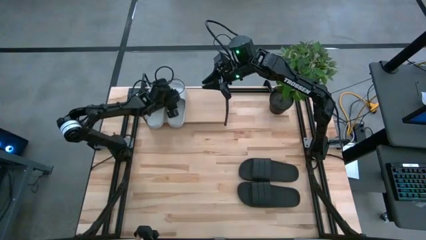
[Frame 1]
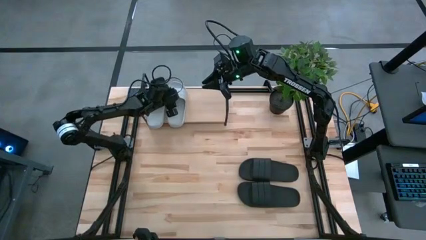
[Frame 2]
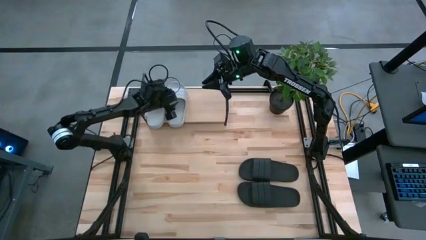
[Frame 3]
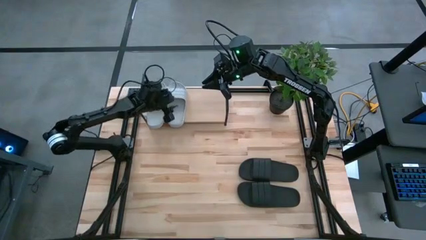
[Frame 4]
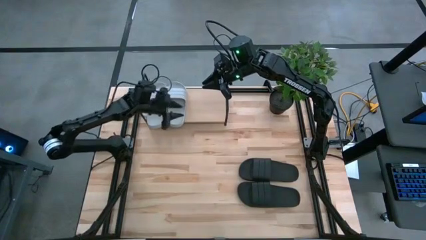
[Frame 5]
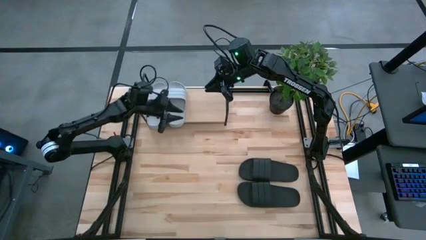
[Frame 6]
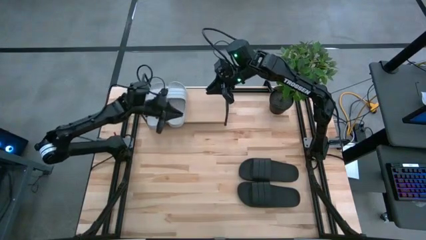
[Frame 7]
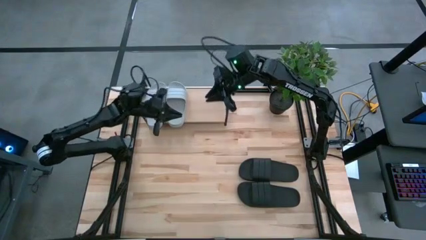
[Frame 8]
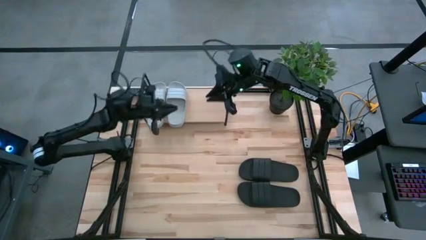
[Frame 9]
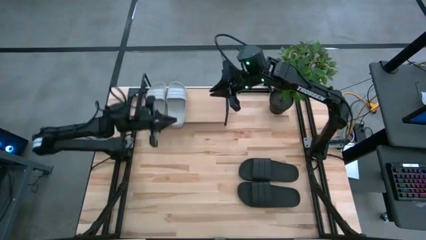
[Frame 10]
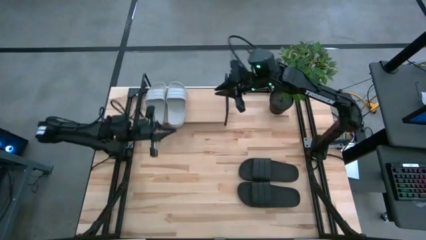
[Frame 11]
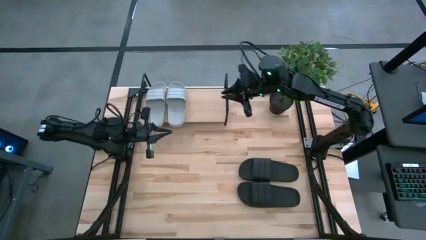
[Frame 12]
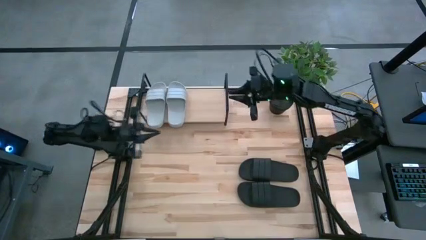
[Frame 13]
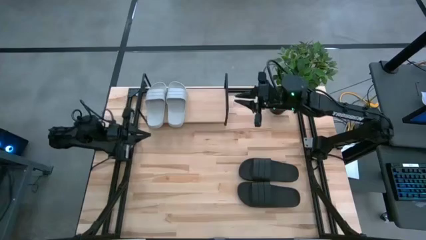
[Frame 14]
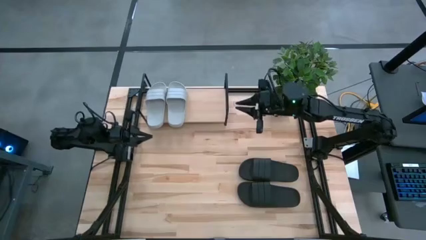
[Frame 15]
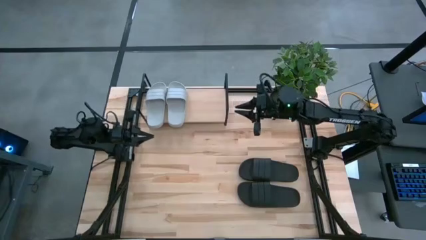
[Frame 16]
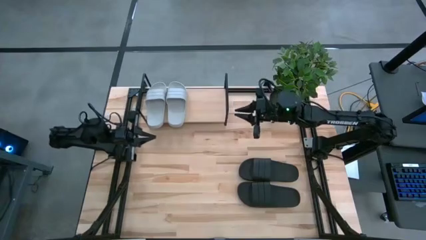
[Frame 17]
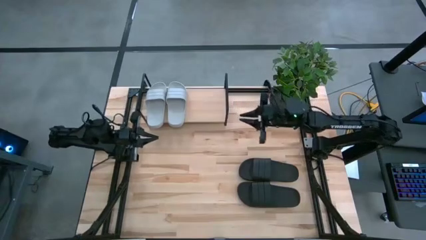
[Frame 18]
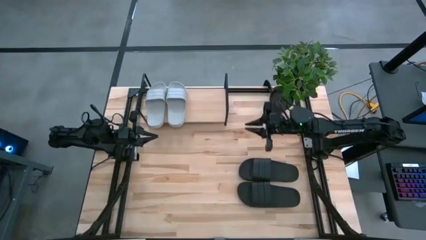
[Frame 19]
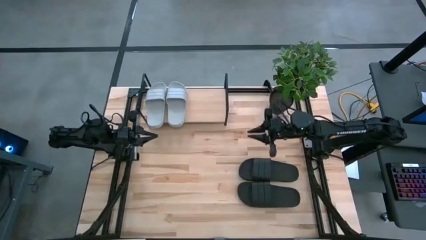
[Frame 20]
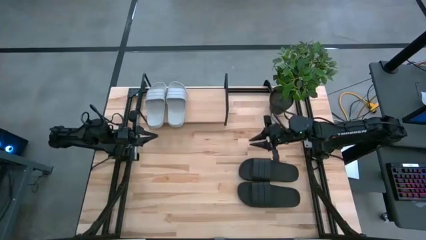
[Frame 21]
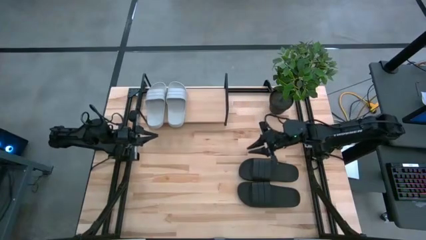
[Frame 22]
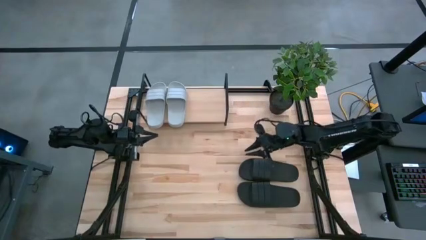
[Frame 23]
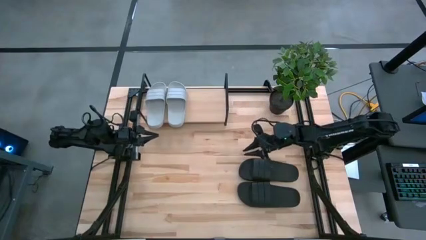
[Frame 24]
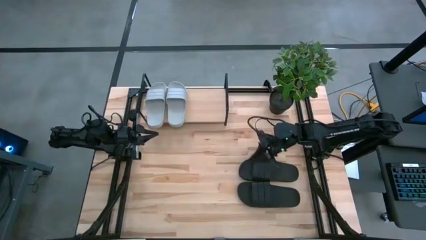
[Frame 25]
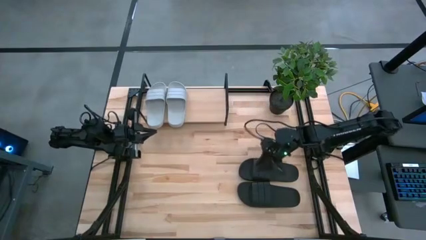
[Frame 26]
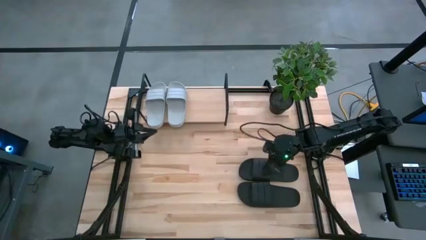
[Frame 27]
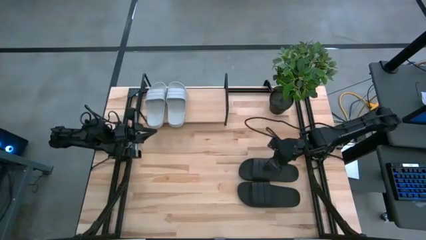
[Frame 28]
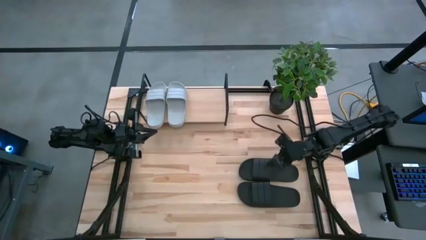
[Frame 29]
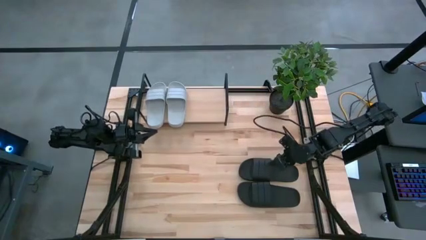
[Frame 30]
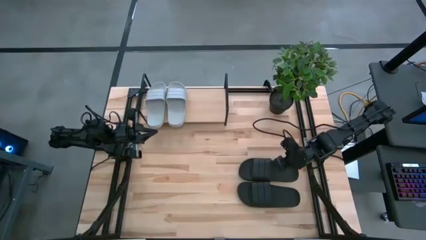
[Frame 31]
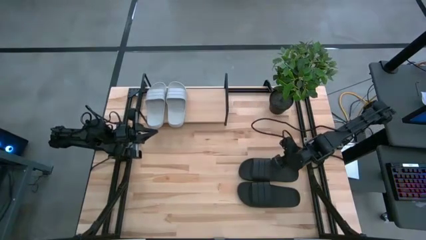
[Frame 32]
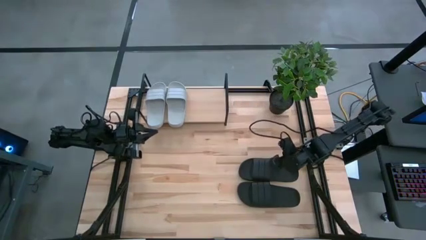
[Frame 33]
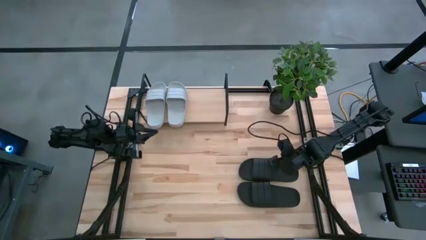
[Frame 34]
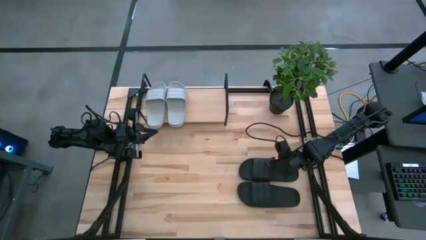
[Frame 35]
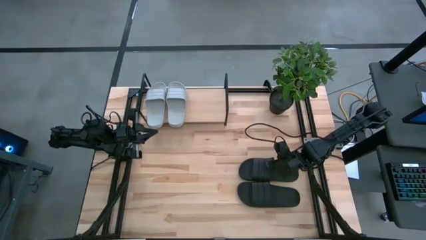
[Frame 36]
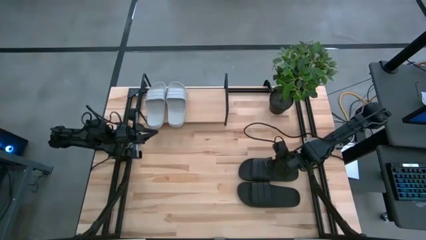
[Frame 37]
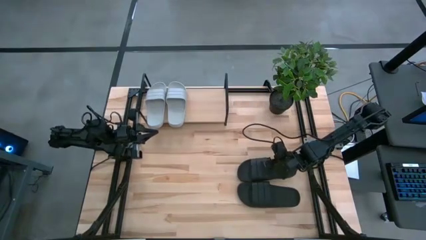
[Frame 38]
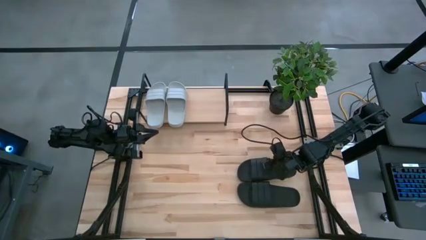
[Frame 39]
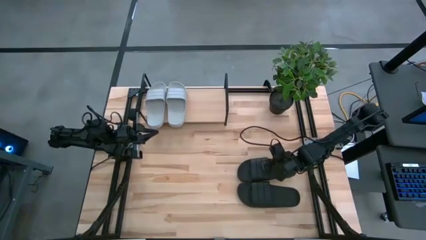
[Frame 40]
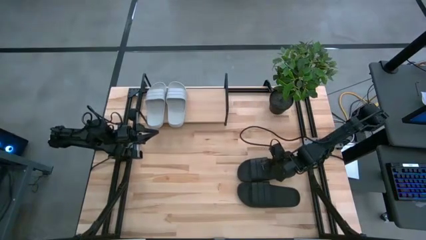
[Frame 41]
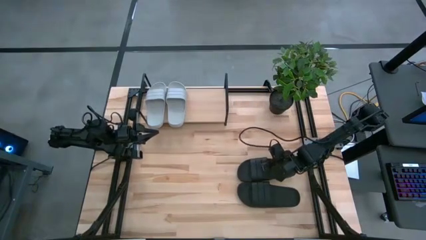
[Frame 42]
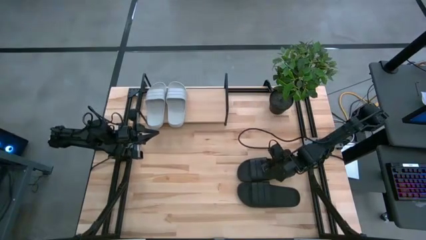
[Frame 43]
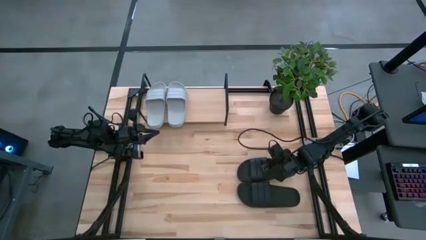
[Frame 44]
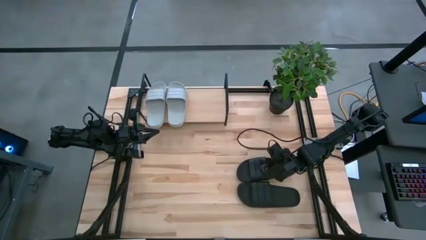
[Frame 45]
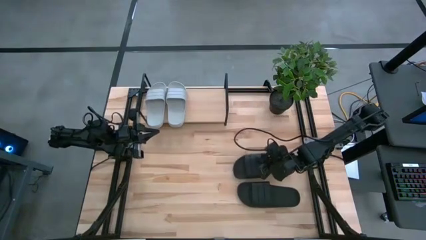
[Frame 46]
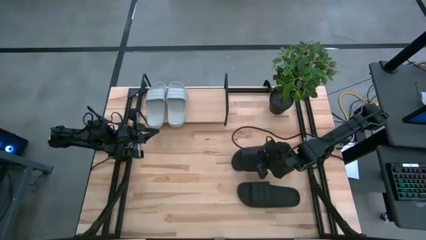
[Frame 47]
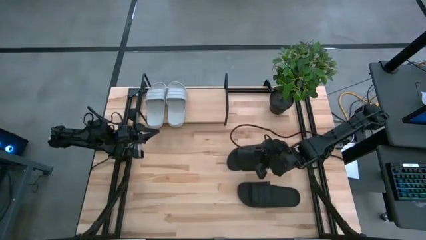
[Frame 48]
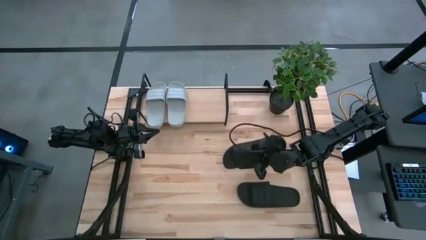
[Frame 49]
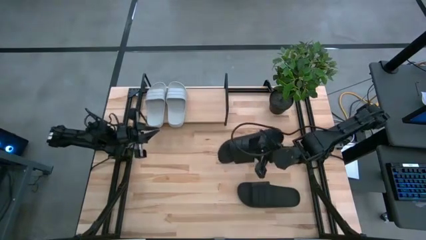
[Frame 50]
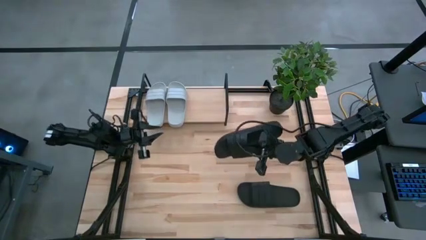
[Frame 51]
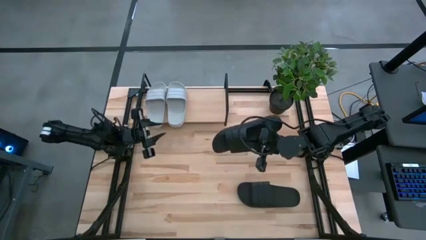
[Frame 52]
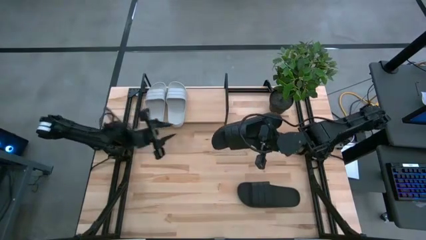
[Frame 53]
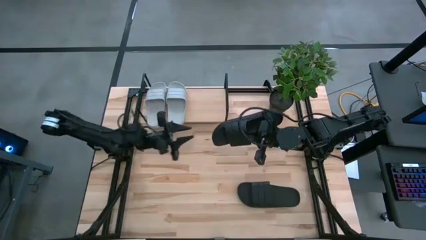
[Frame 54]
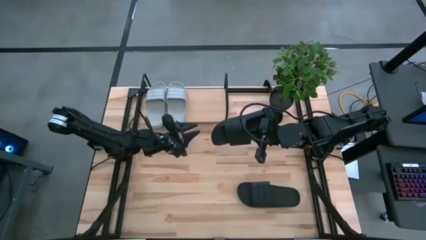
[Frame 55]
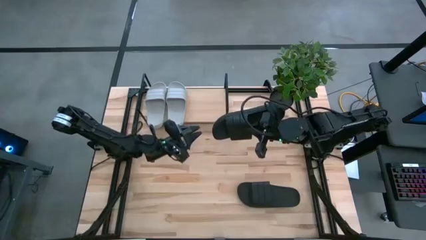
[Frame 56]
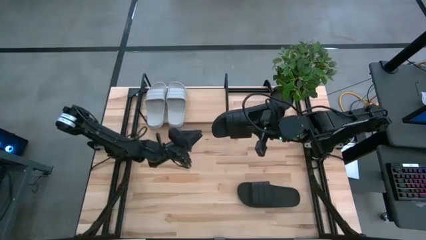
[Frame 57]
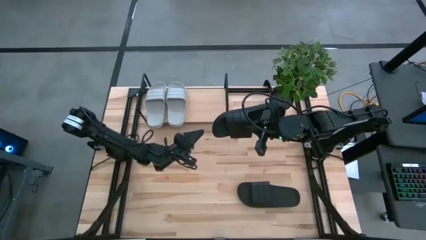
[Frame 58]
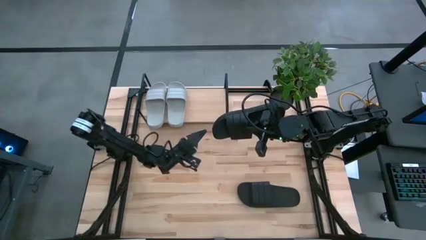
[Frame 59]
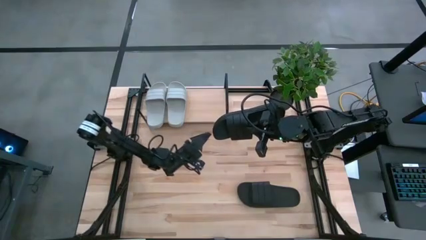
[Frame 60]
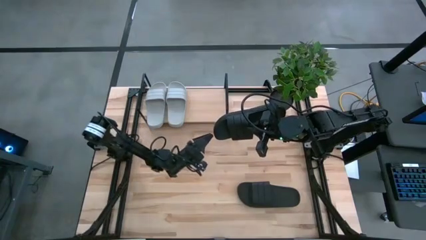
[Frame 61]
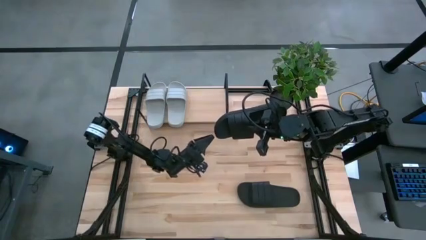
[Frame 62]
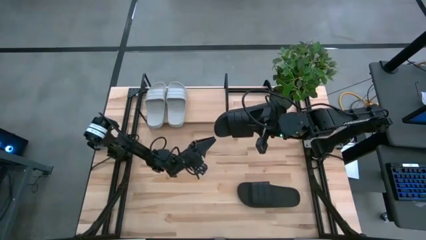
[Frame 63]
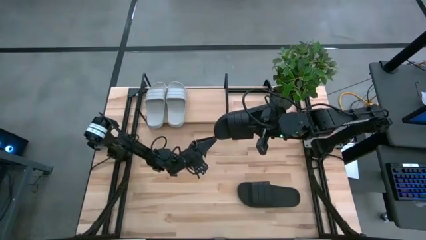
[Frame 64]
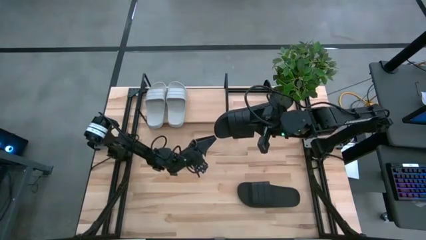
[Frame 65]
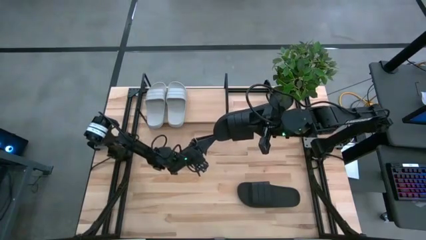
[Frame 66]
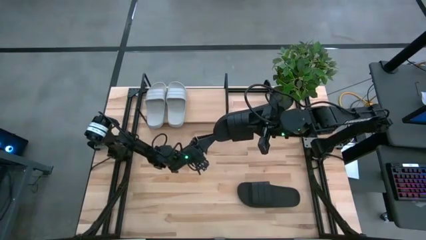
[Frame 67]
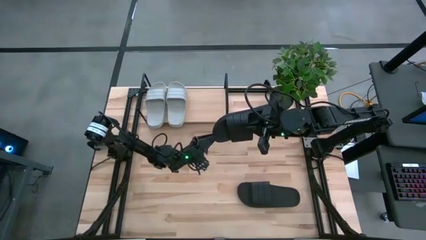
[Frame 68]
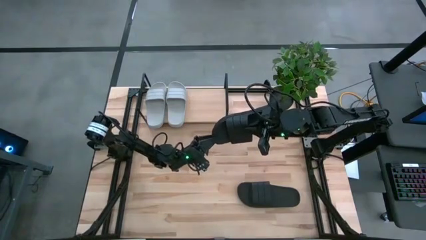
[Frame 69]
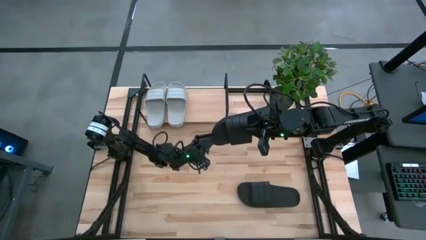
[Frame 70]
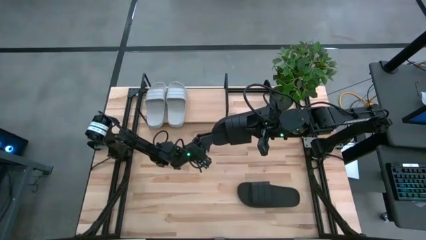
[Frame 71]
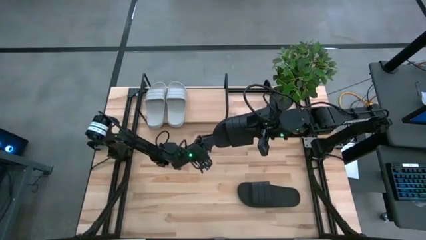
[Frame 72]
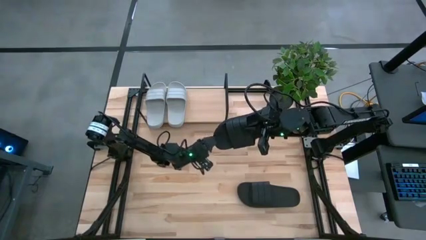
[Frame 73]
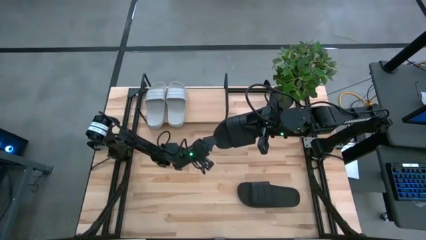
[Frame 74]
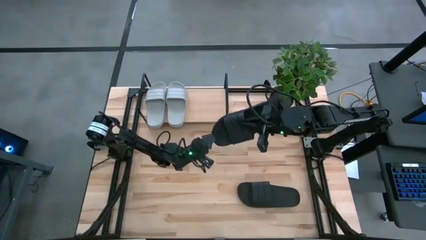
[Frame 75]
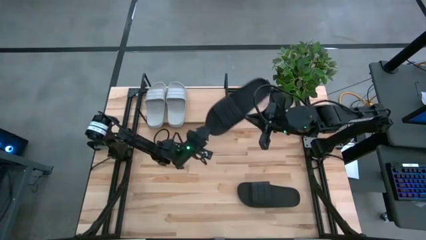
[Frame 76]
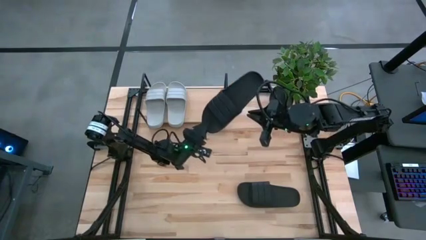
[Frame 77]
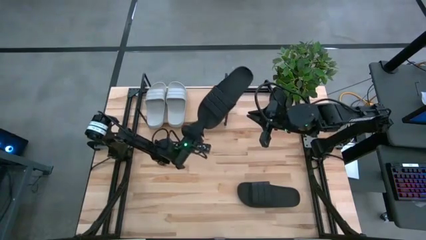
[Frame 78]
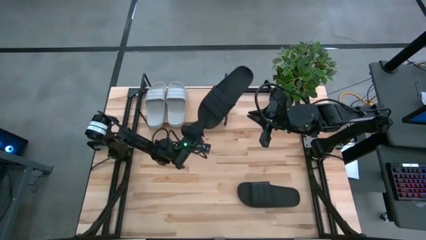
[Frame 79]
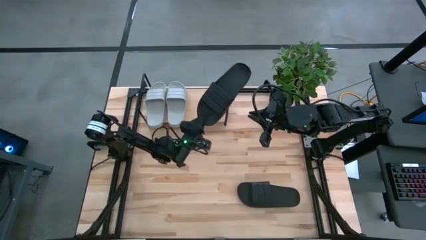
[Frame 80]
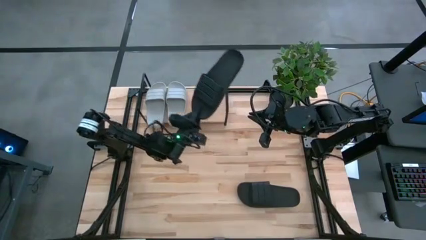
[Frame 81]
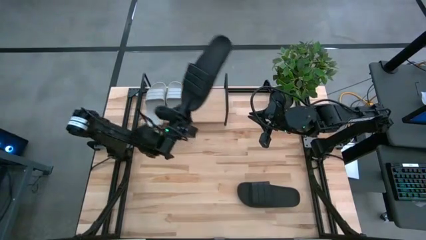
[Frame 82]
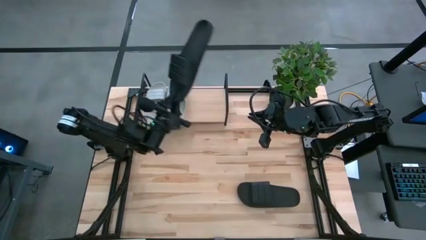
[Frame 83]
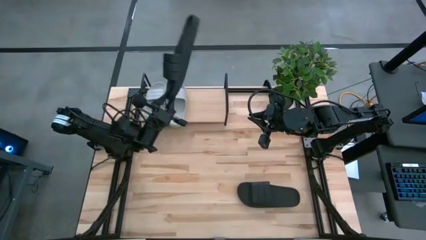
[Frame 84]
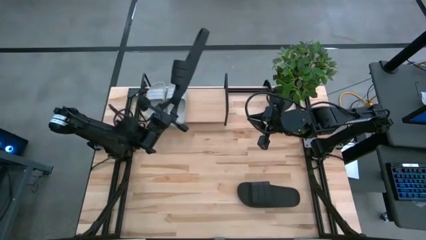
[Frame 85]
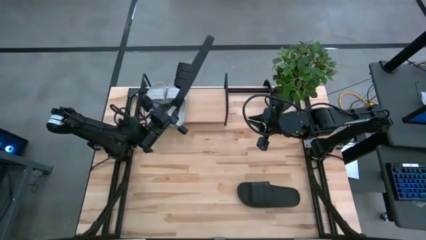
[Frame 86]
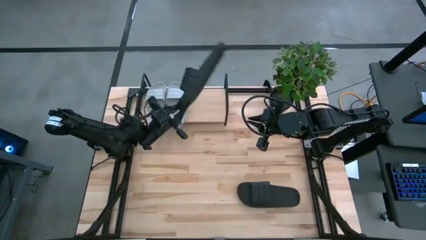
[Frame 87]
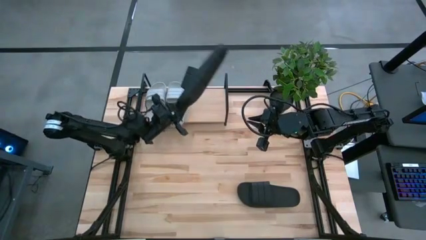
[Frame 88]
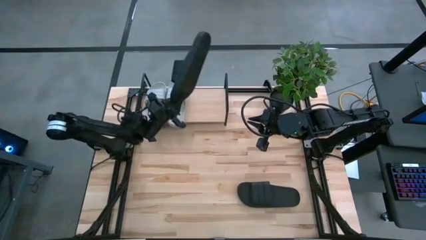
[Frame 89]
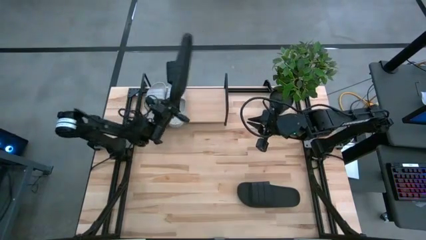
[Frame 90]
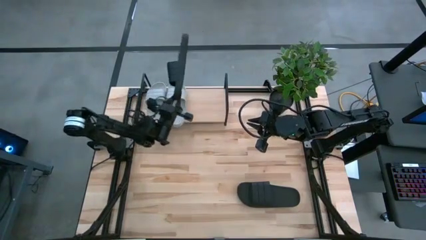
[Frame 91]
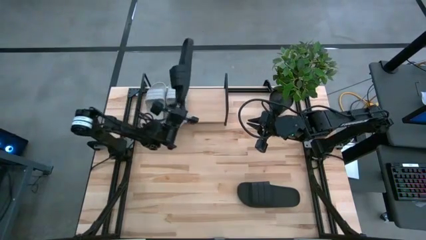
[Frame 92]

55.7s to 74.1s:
Task: Pick and place slides into the shelf
Put the top black slides on the shelf
